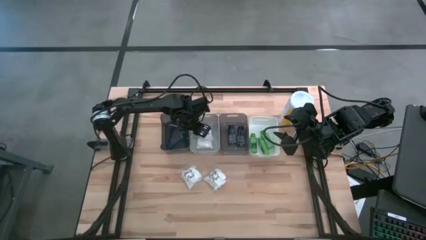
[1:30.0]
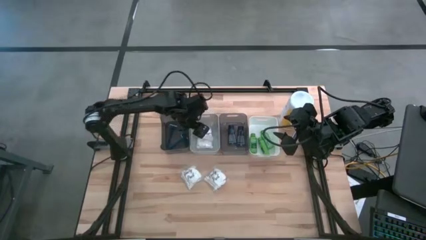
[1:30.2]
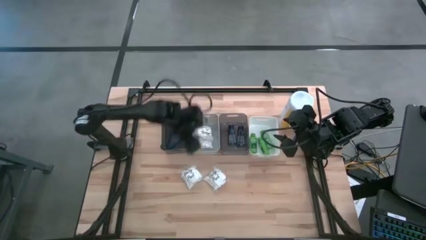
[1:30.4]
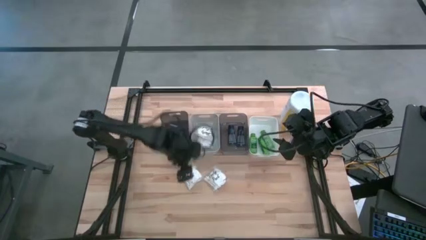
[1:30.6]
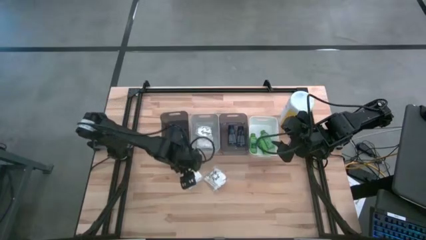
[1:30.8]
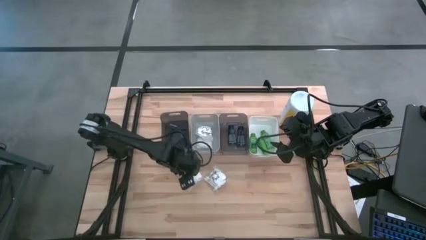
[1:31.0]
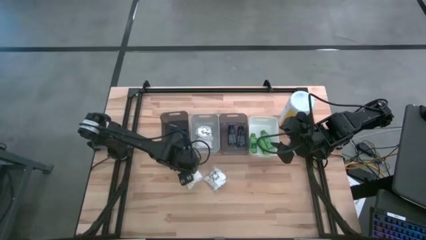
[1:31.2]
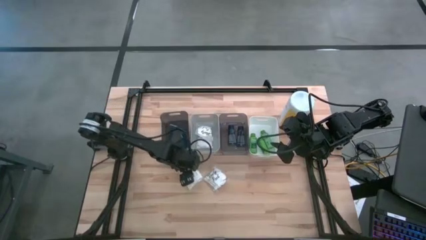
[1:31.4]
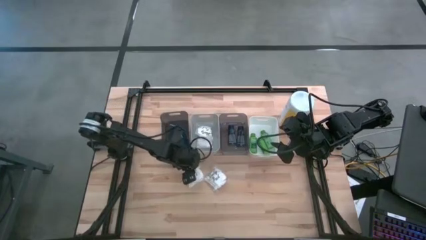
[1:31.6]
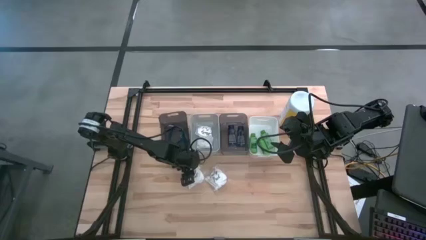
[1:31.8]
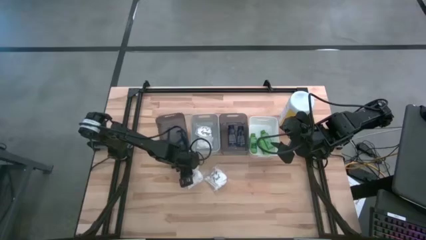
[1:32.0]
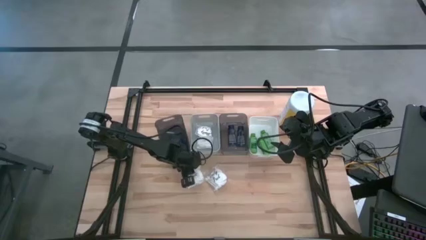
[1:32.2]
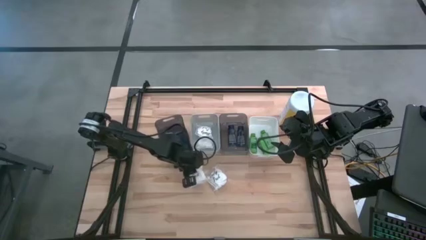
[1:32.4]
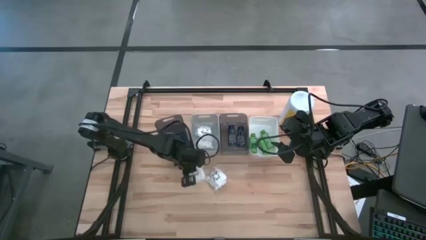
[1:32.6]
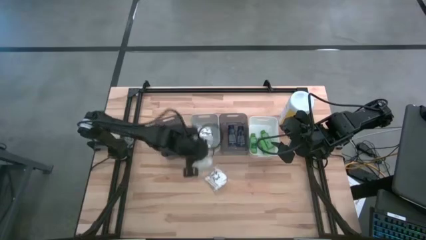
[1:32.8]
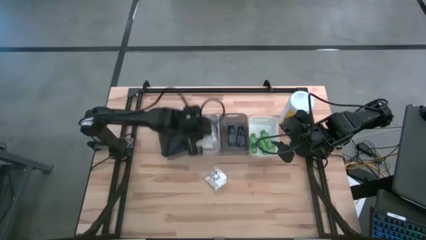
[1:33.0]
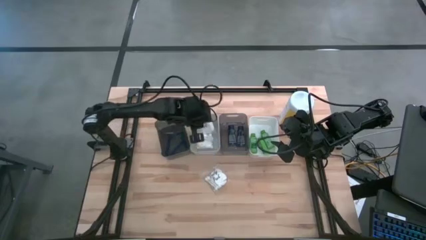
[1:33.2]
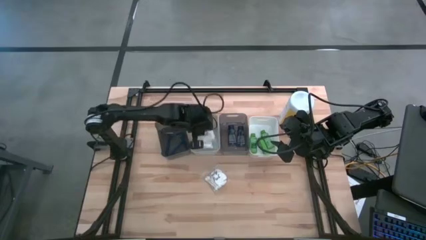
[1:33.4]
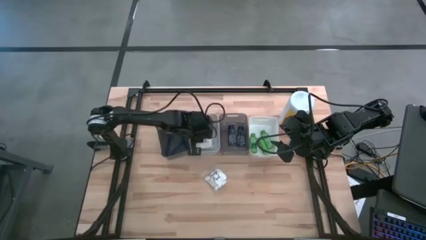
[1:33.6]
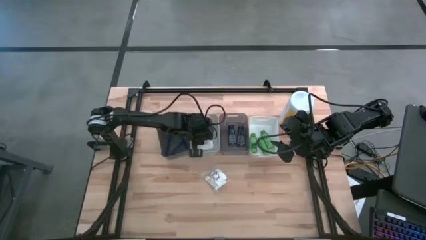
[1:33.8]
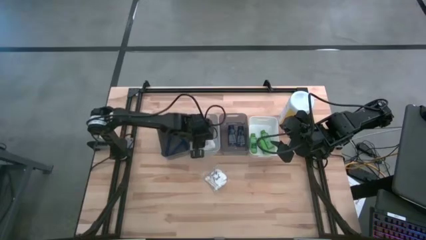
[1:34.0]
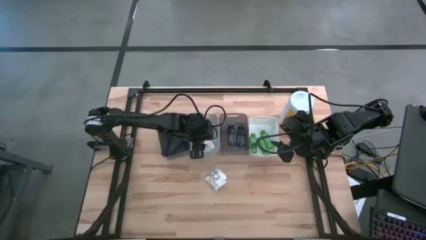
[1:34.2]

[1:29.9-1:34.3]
Task: Pick & Place Travel size toiletries
Put the white cotton pack into the gray bin

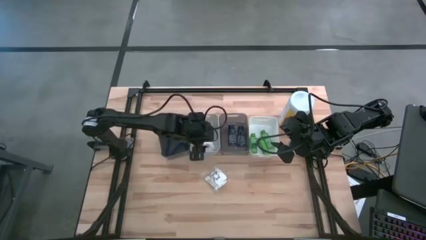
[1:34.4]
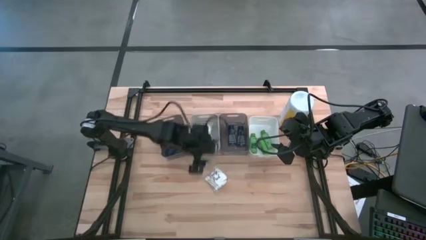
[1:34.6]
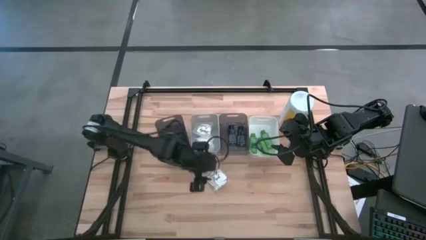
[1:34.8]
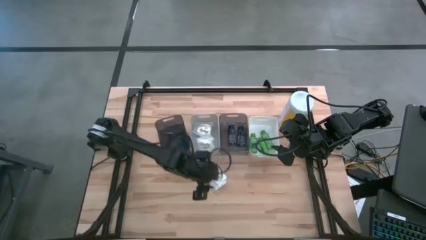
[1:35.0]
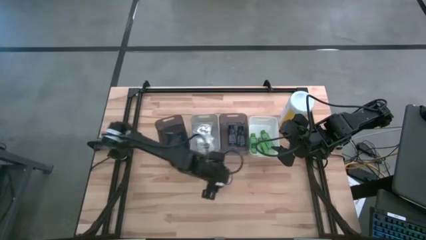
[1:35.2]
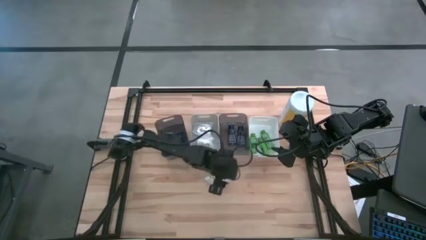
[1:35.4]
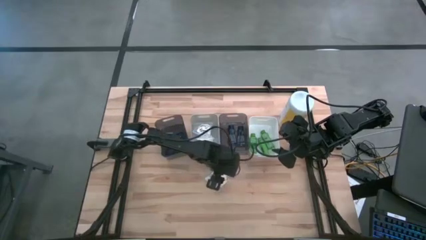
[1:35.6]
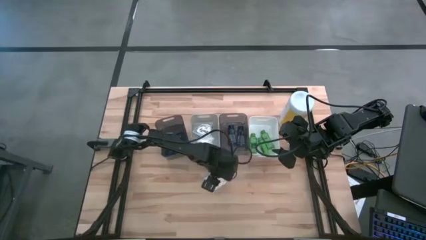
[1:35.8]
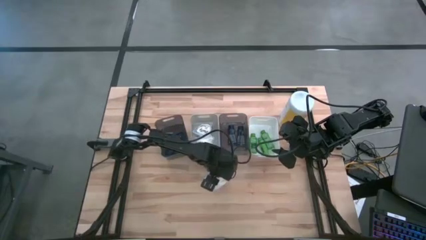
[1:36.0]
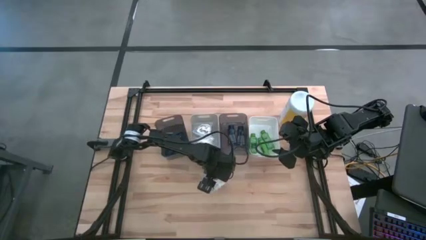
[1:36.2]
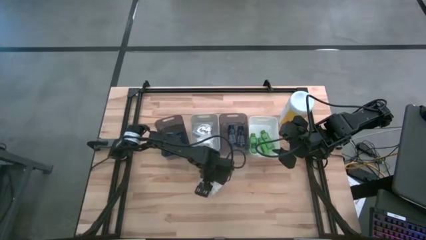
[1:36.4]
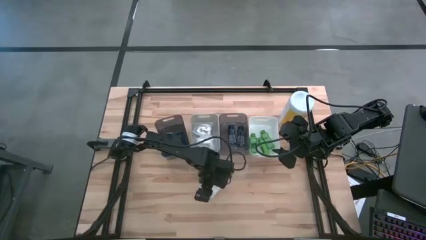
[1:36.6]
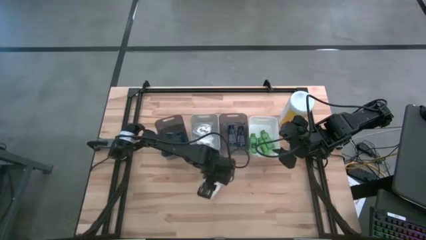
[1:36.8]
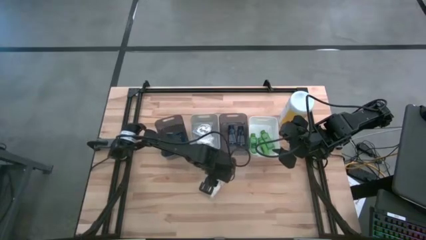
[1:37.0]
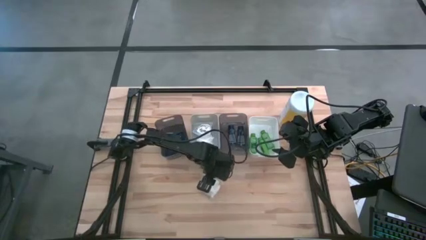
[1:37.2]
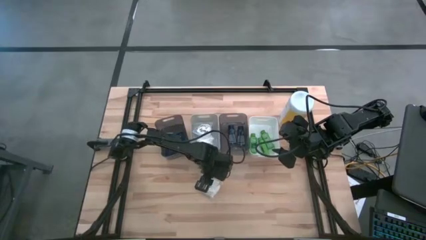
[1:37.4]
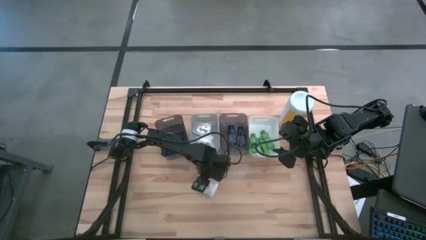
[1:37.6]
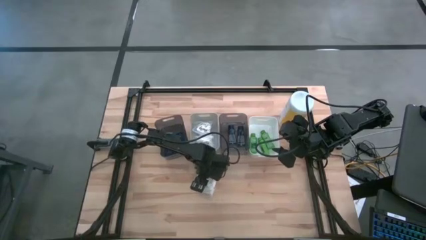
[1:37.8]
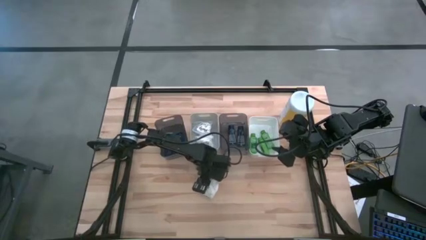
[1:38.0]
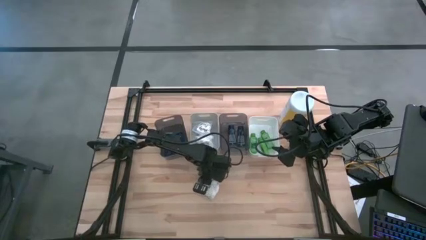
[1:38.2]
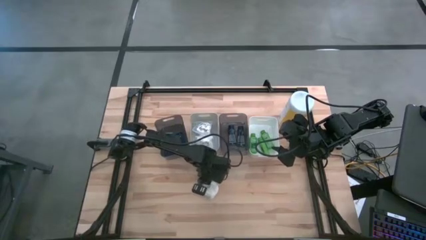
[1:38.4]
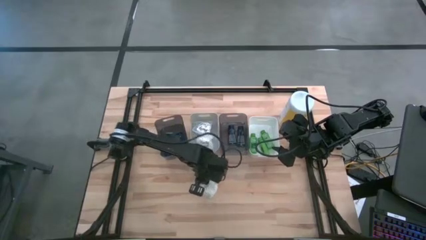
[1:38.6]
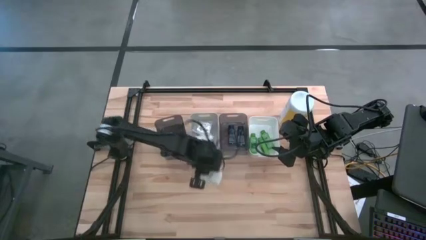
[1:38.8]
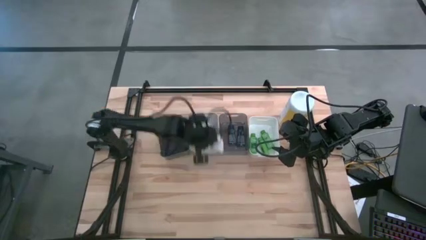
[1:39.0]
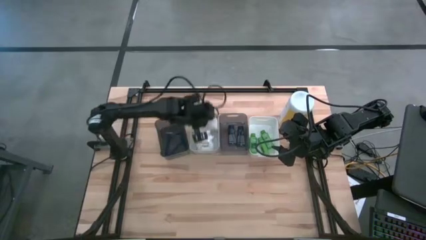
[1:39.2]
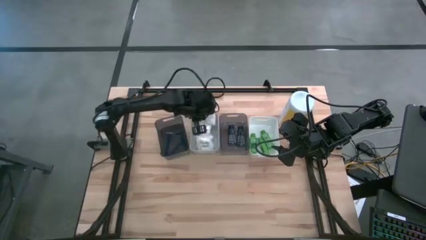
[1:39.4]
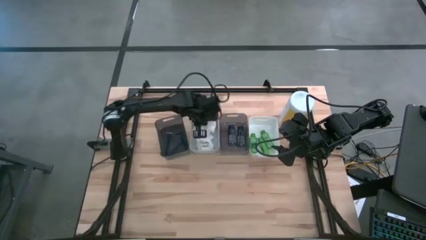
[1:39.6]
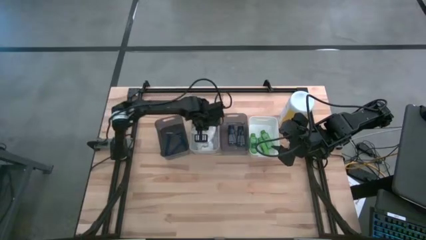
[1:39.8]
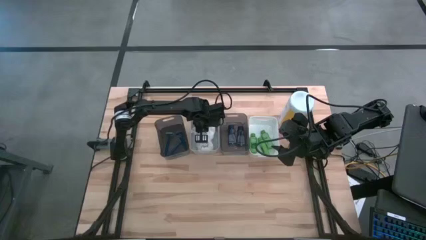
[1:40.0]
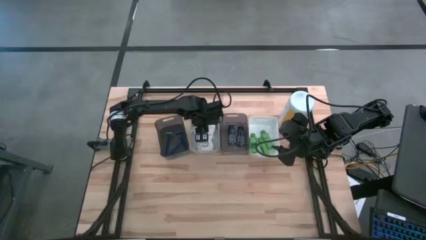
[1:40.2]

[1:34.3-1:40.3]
Put the white cotton pack into the gray bin

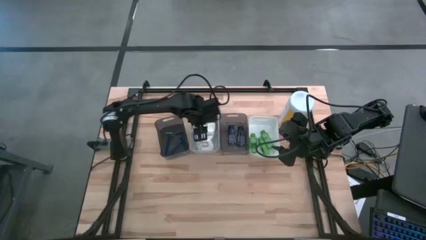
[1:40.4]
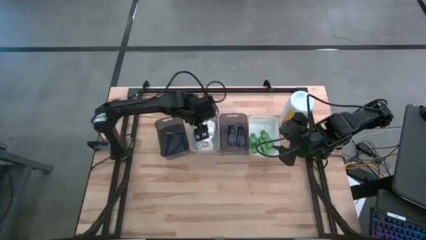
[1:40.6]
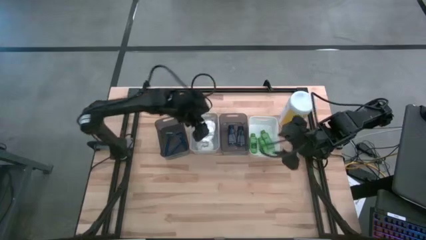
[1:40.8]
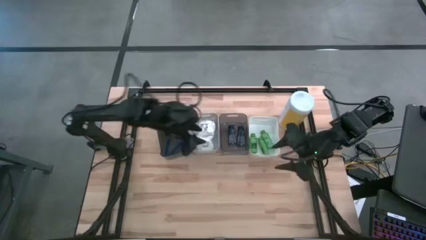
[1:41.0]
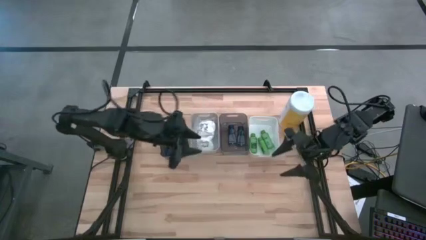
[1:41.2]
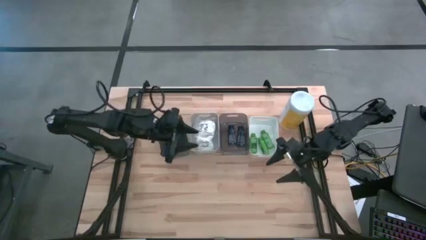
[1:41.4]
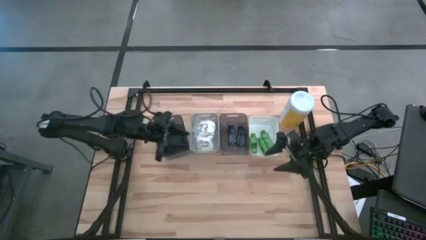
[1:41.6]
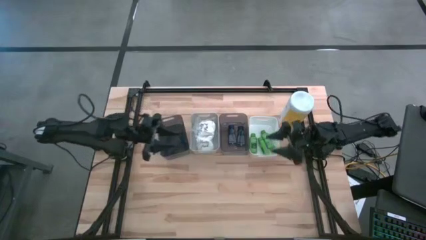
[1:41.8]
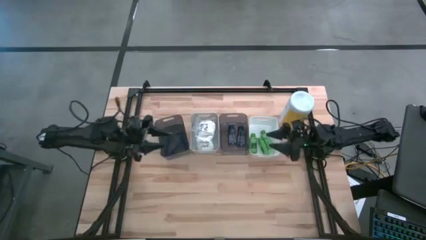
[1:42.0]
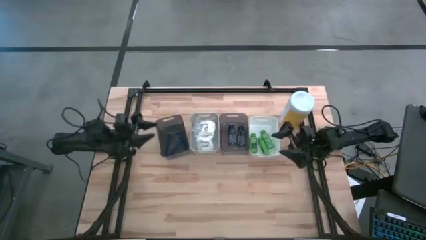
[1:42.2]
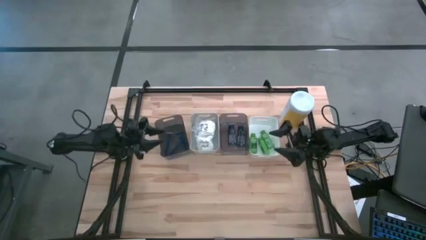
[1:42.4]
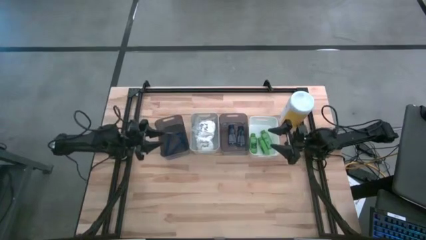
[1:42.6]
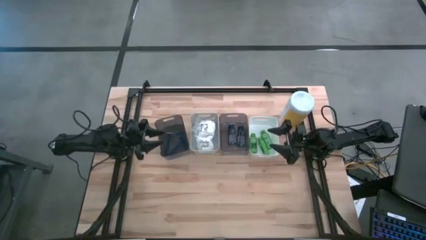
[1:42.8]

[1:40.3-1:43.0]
Return to Home Position

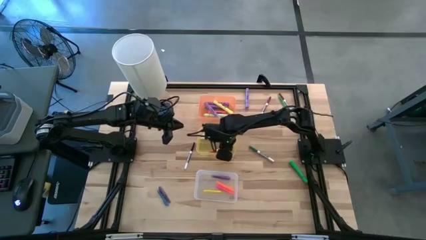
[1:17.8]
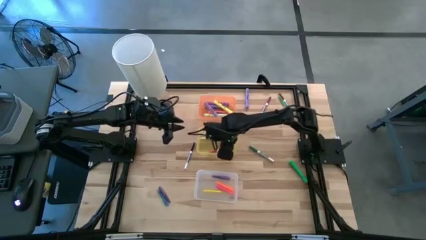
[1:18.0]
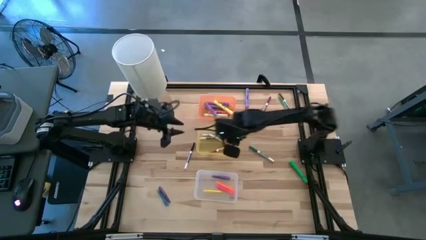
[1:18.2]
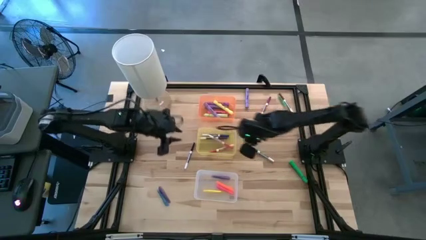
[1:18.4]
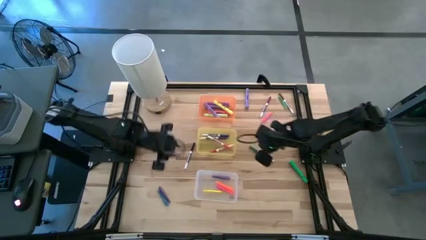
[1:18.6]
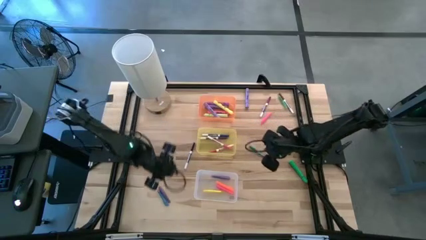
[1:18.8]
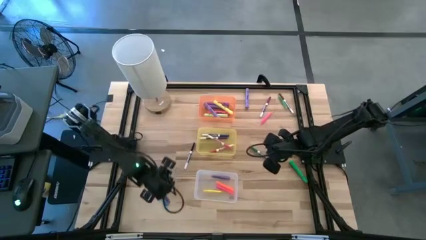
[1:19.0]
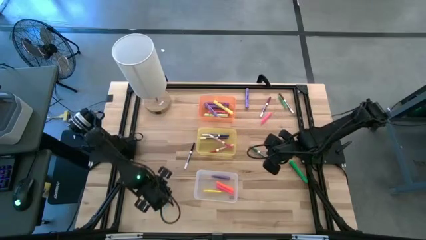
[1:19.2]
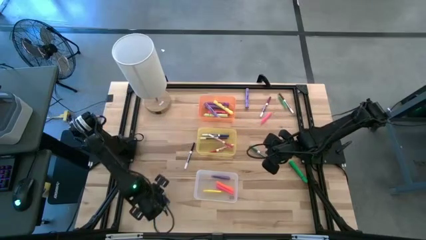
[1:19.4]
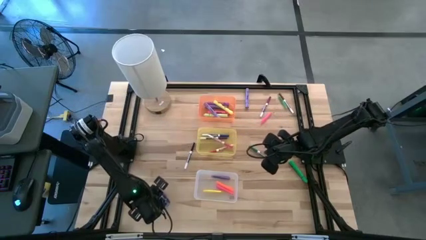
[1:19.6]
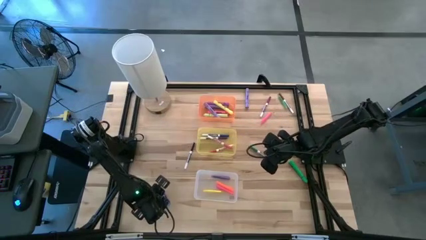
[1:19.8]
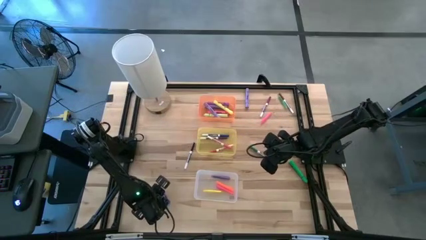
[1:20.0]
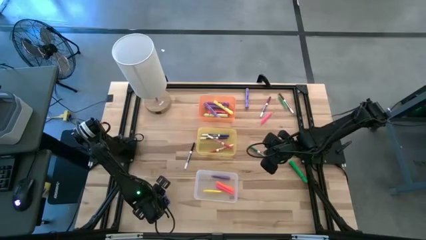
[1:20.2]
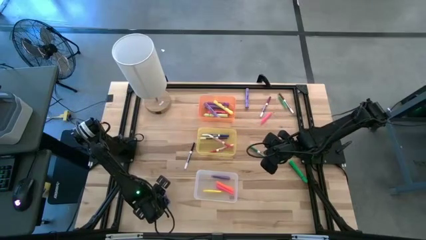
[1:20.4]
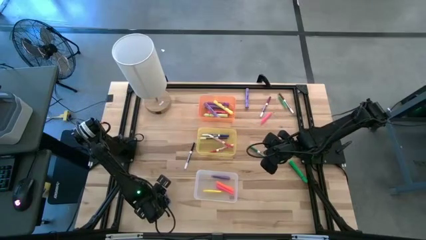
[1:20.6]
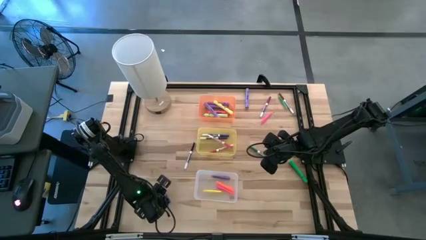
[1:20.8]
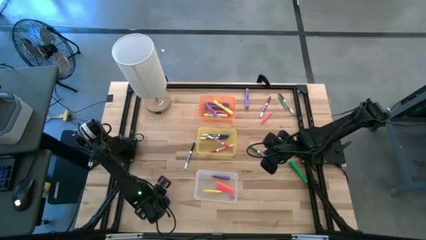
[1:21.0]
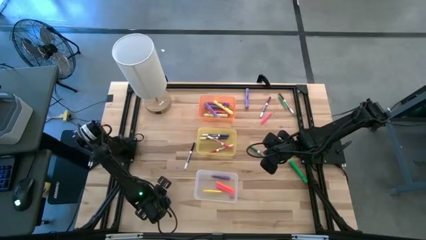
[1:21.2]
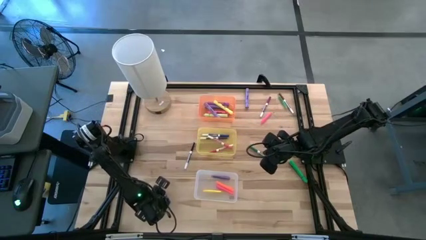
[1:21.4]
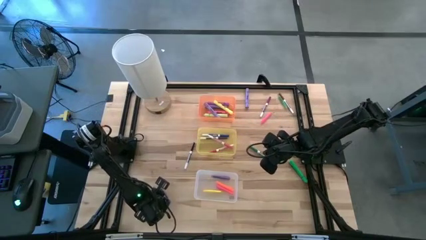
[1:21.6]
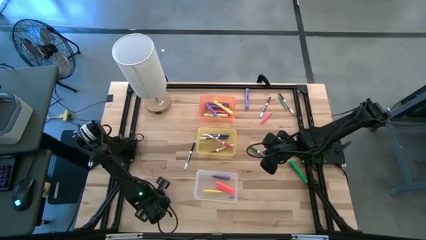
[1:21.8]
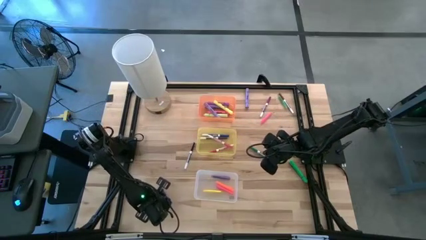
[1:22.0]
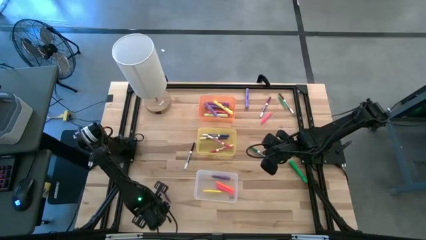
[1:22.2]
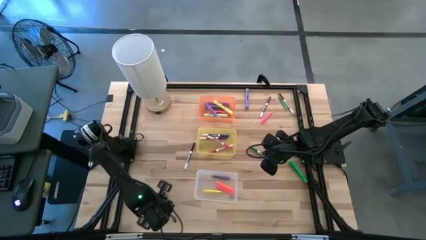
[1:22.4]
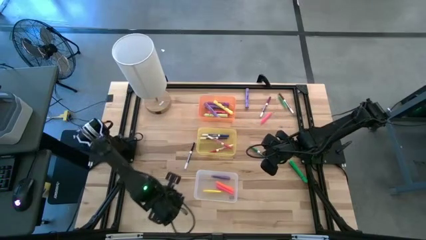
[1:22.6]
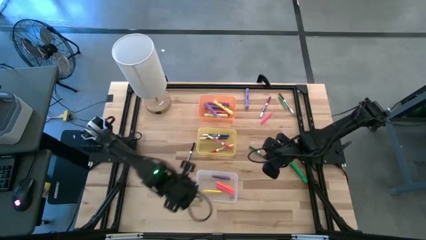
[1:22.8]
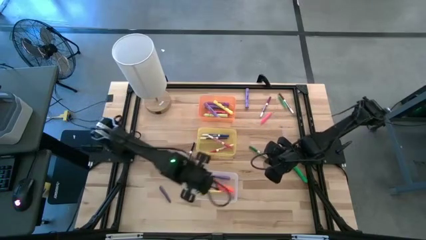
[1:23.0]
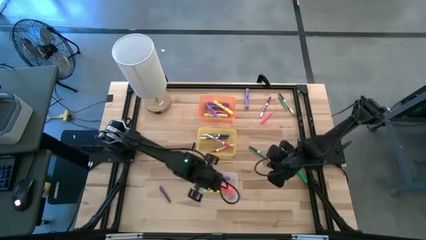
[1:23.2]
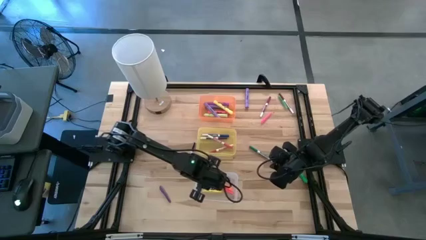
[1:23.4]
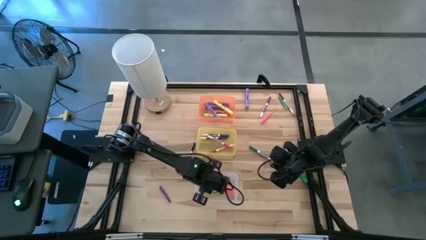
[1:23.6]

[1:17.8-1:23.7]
Task: Pick & Place Markers
Put the light blue pen into the white bin
